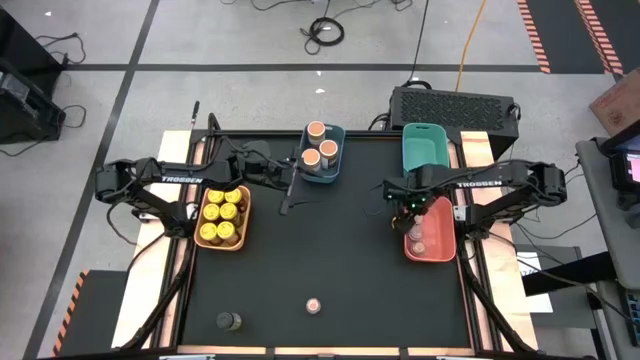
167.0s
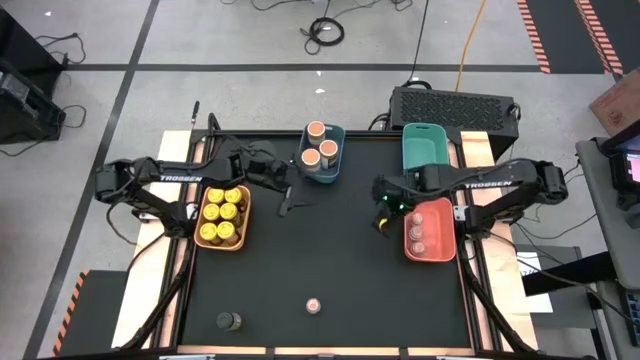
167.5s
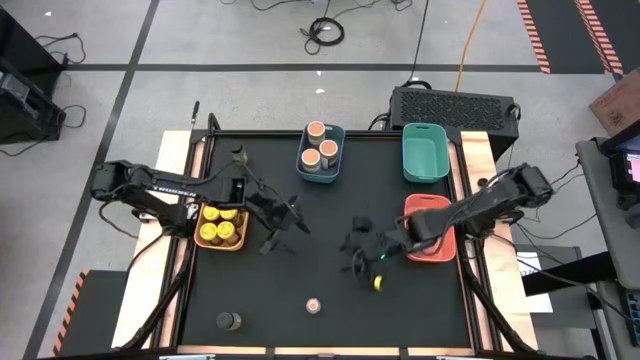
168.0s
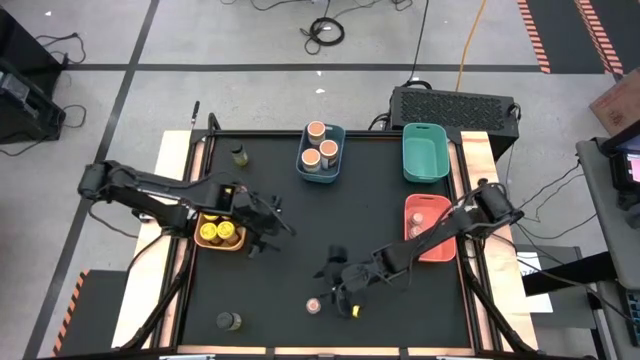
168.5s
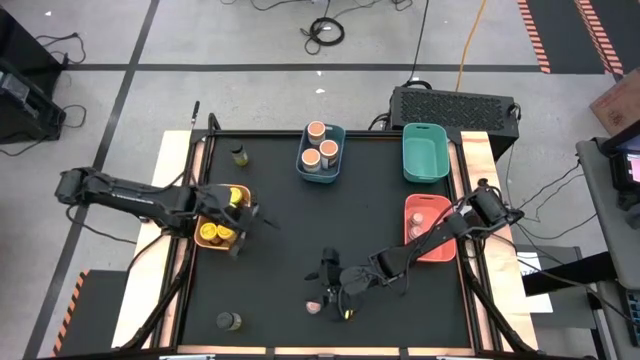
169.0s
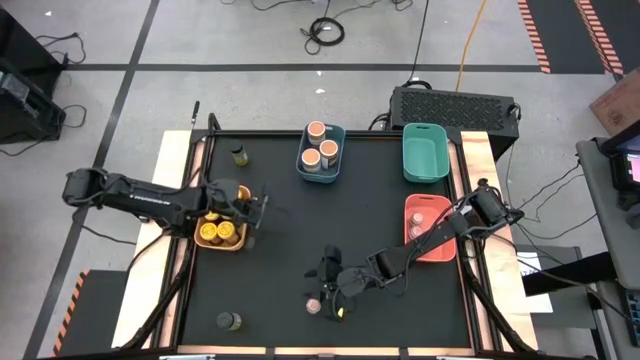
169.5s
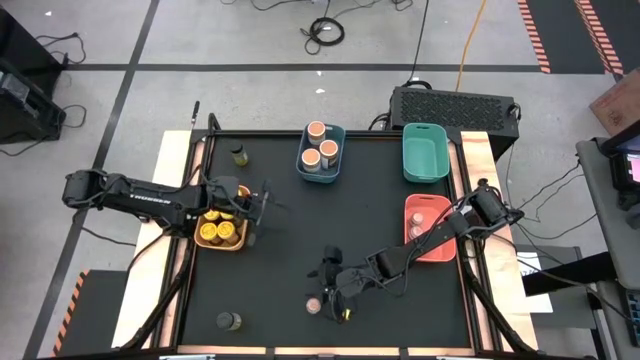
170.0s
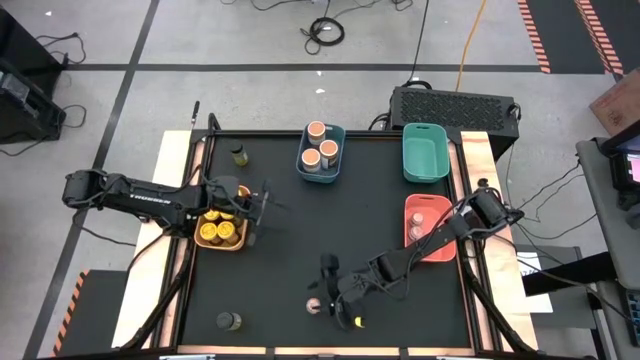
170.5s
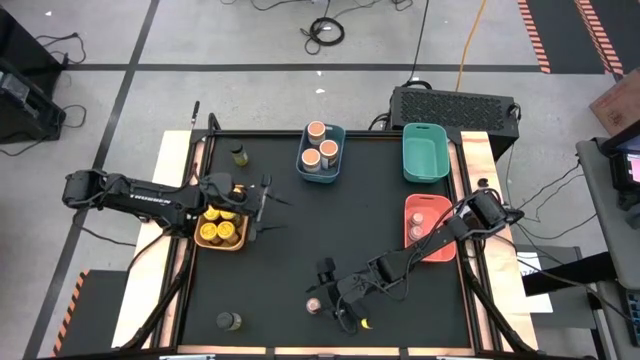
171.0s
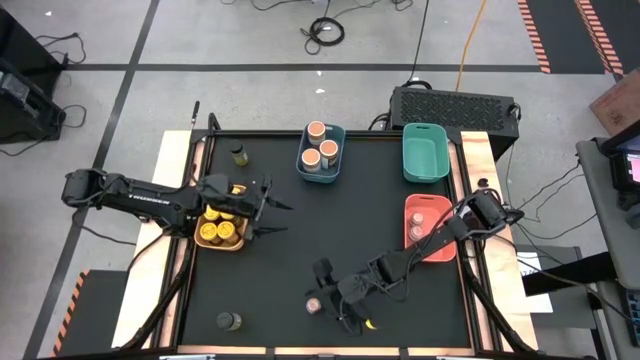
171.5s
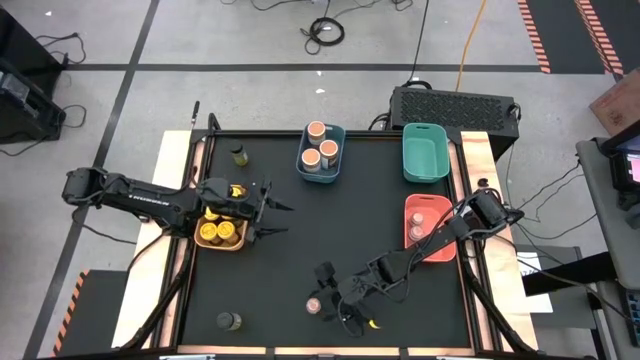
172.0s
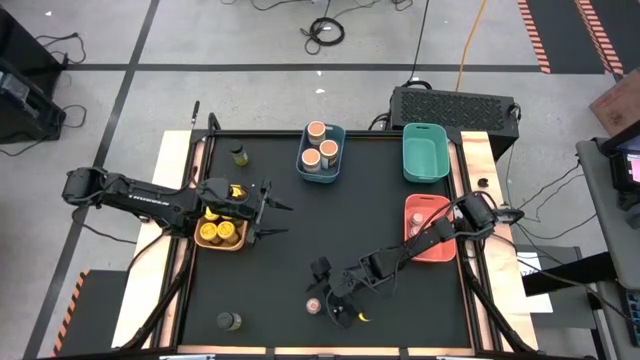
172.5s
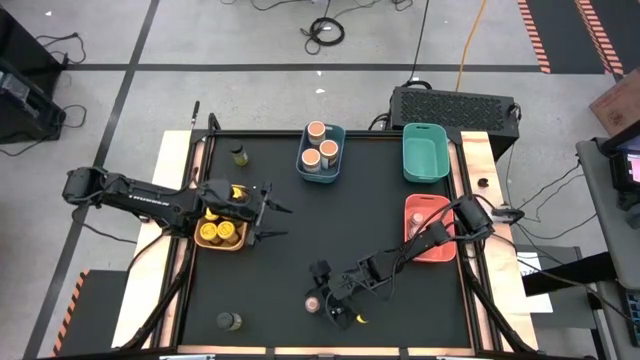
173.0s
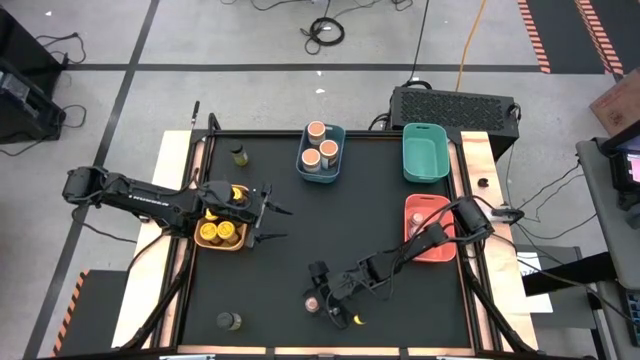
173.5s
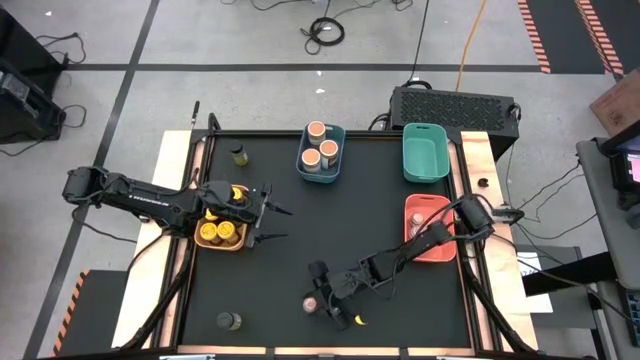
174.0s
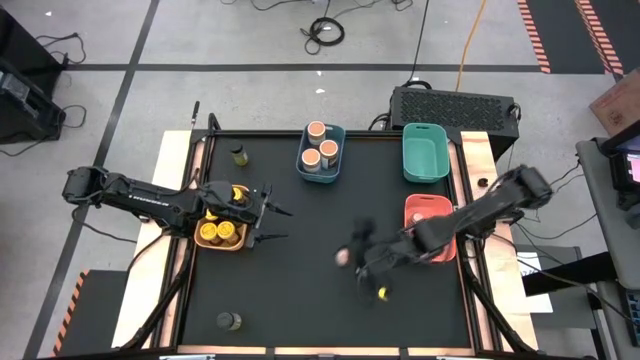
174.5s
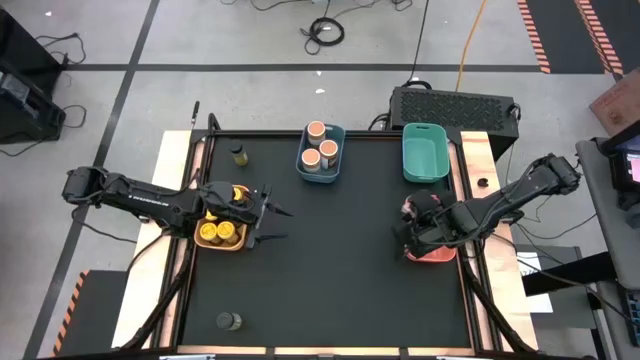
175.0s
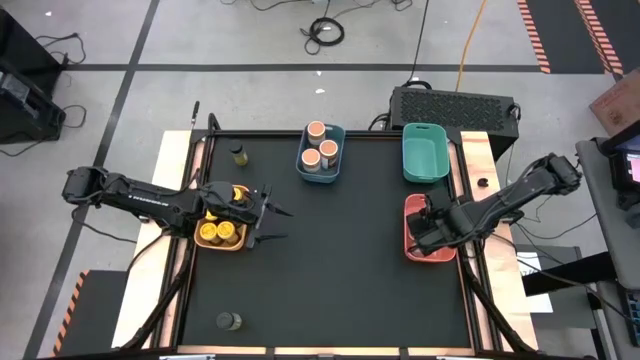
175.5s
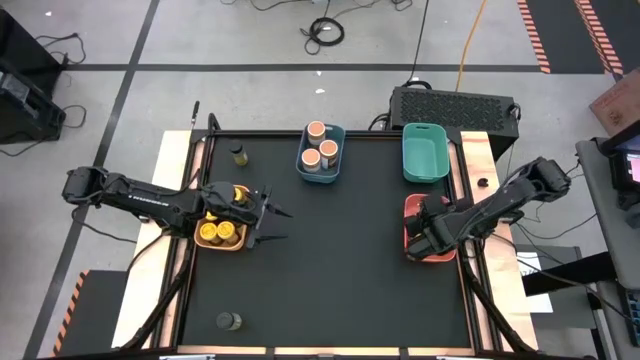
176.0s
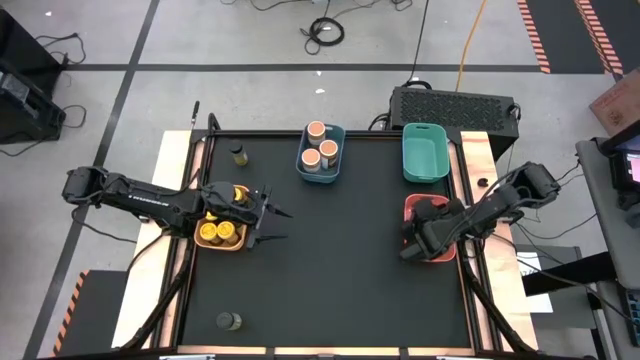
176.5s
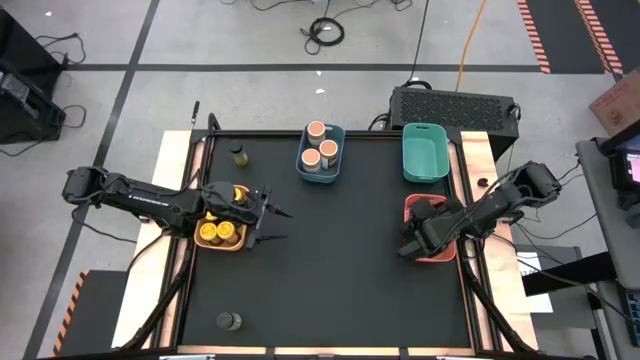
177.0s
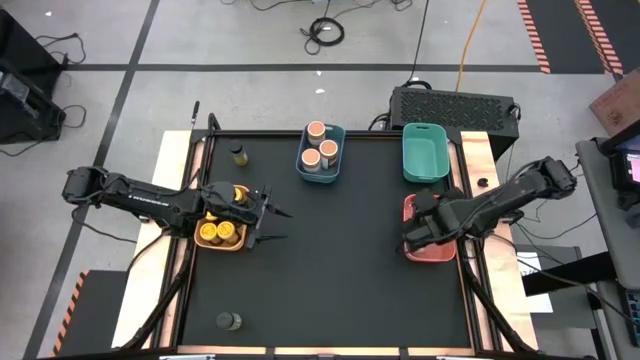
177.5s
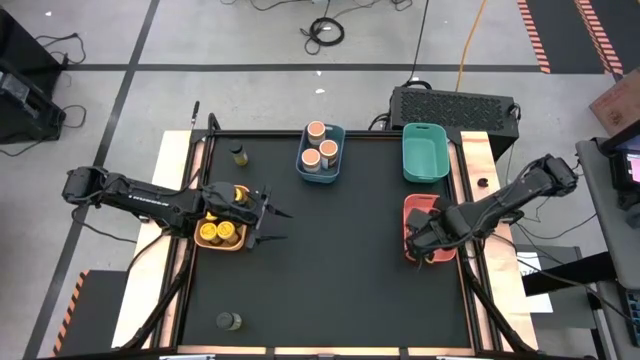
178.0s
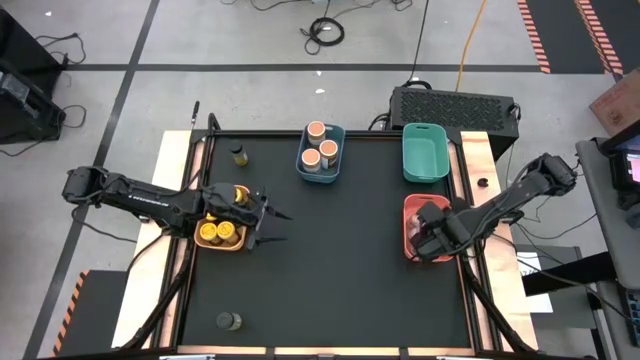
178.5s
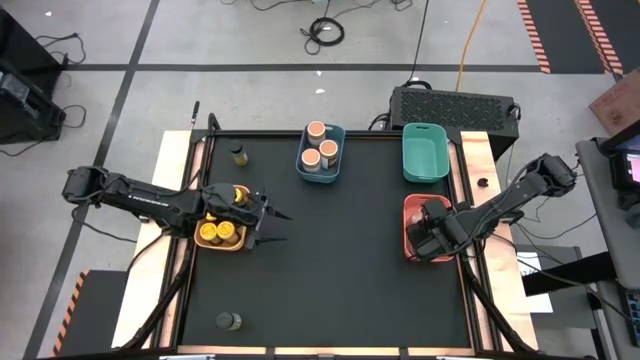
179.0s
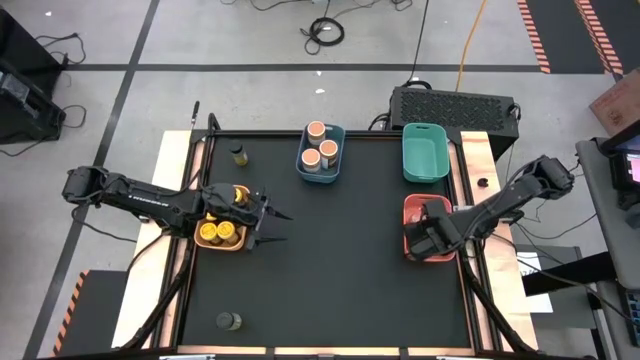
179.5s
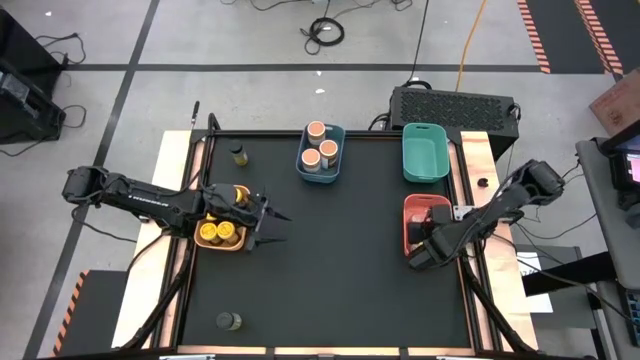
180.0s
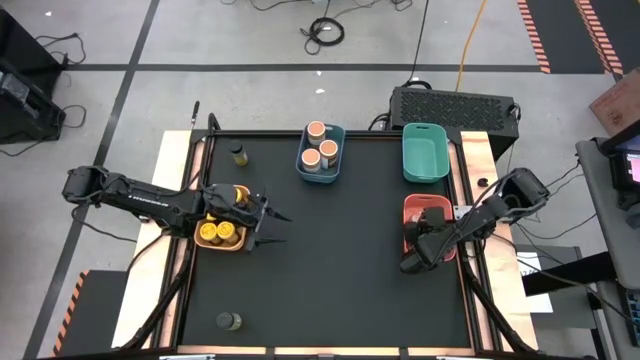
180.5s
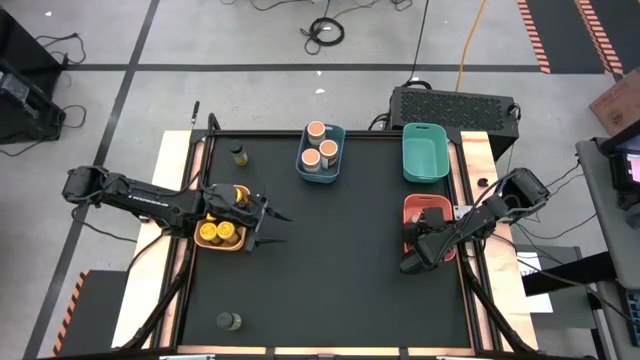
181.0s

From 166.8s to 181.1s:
Task: Sort spices by type
Put the small brown seasoning bottle into the orange bin

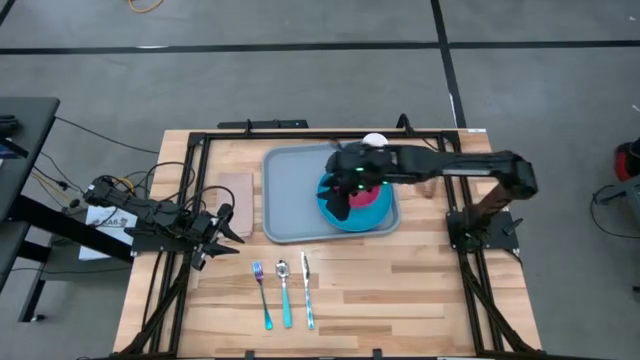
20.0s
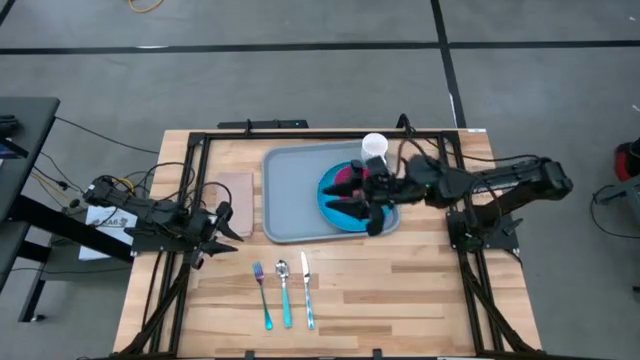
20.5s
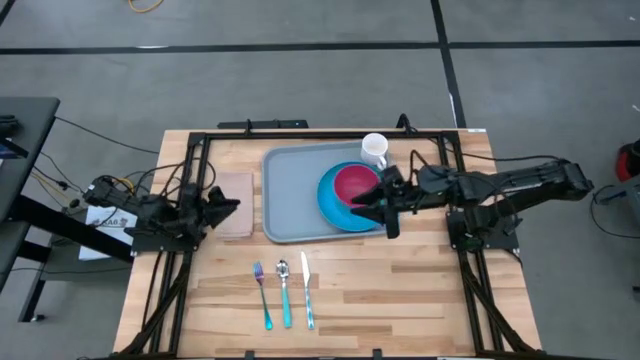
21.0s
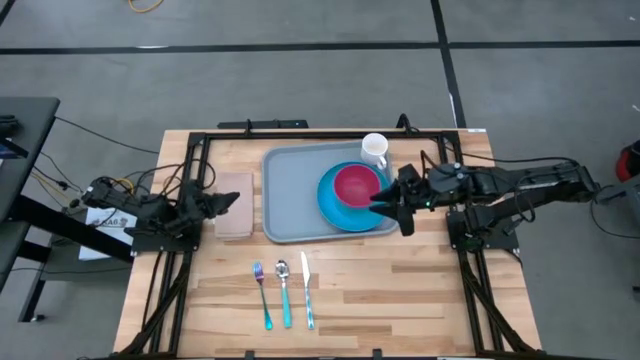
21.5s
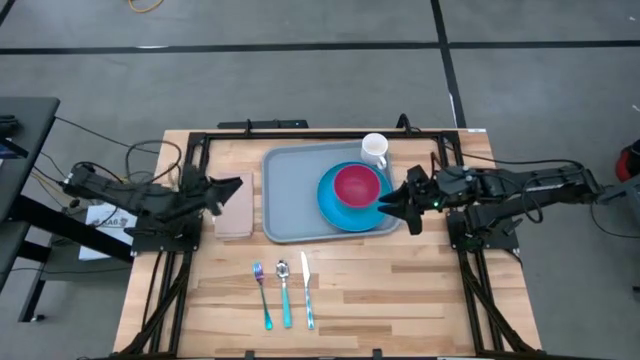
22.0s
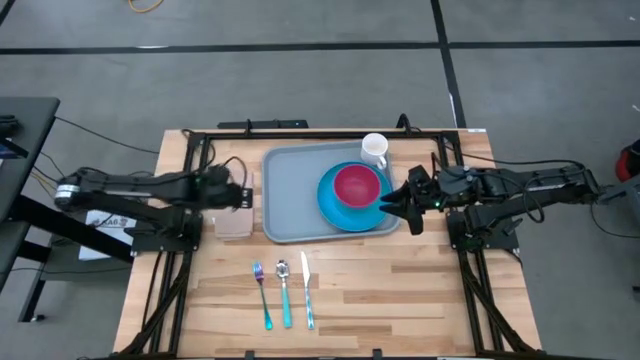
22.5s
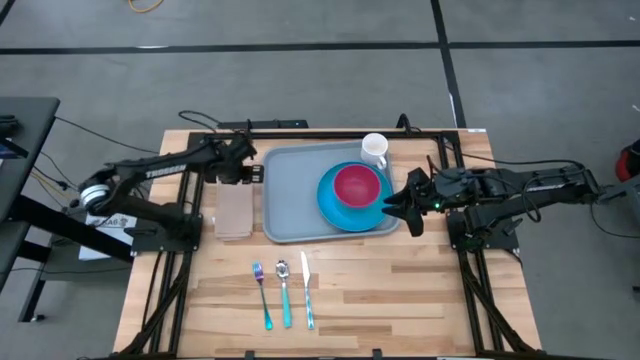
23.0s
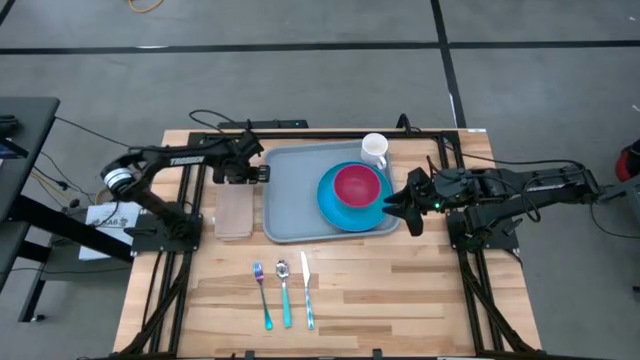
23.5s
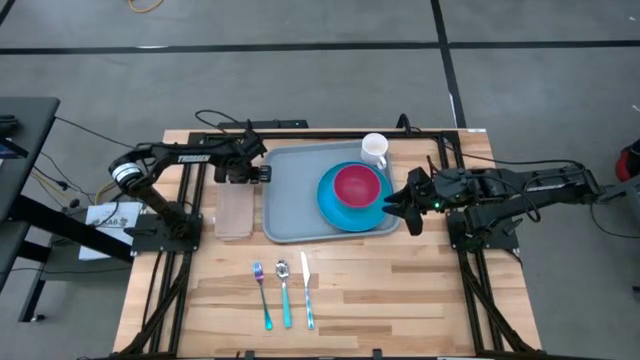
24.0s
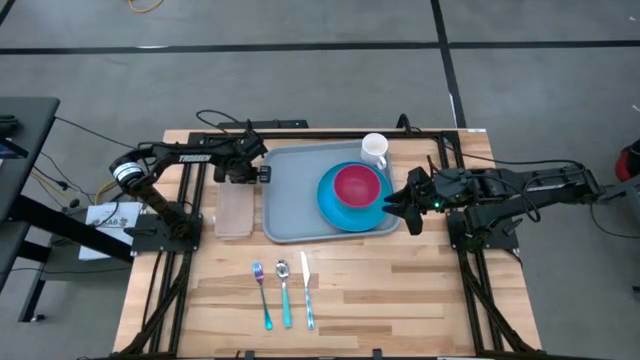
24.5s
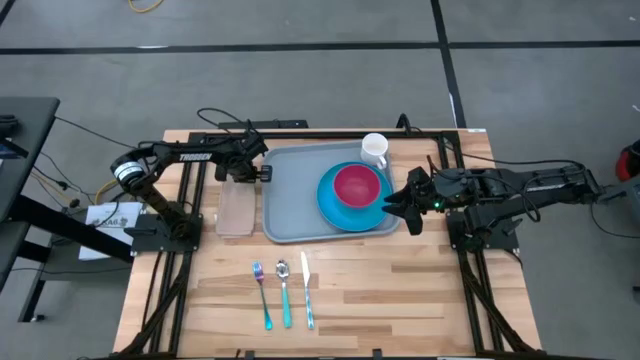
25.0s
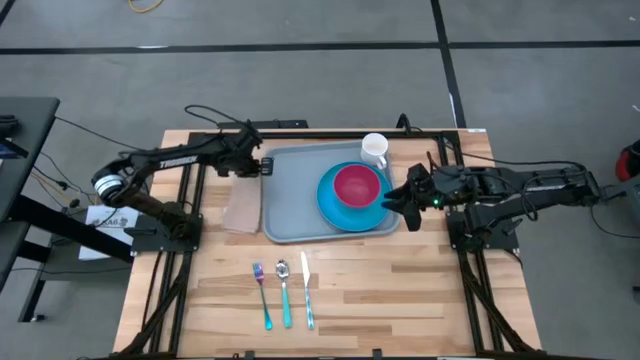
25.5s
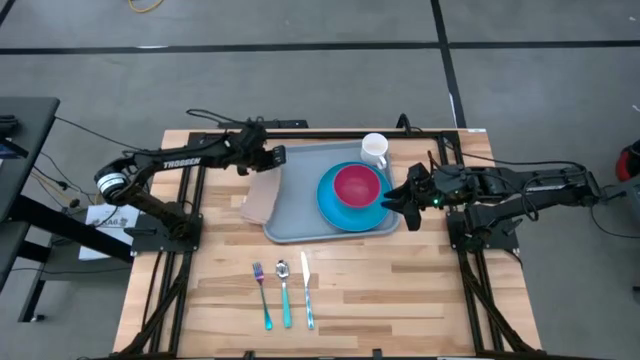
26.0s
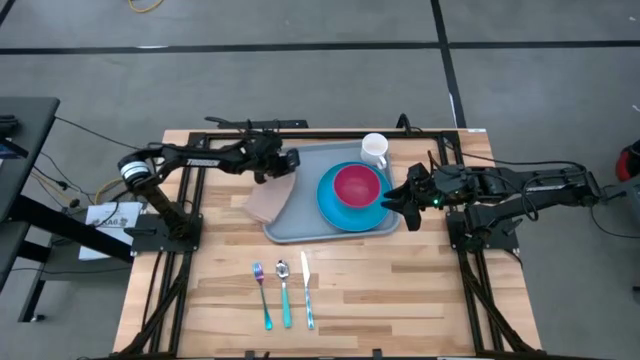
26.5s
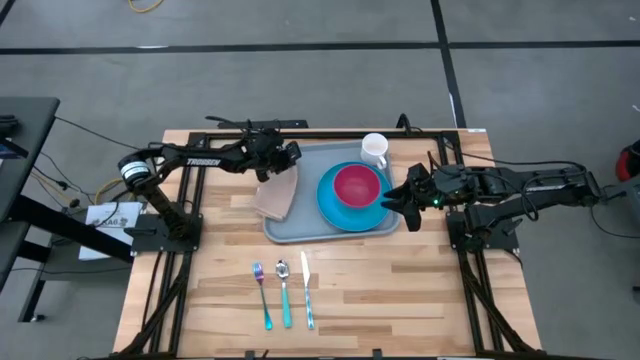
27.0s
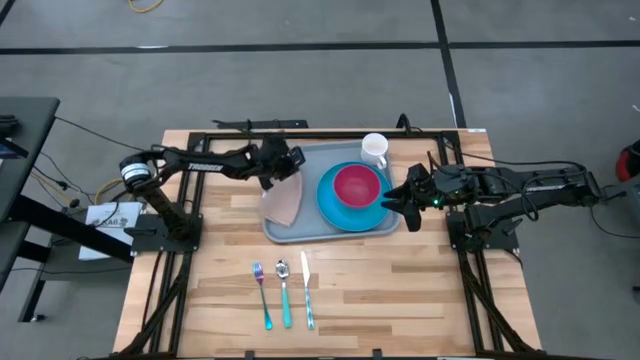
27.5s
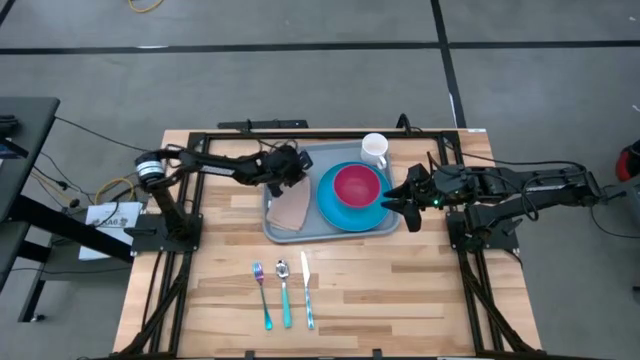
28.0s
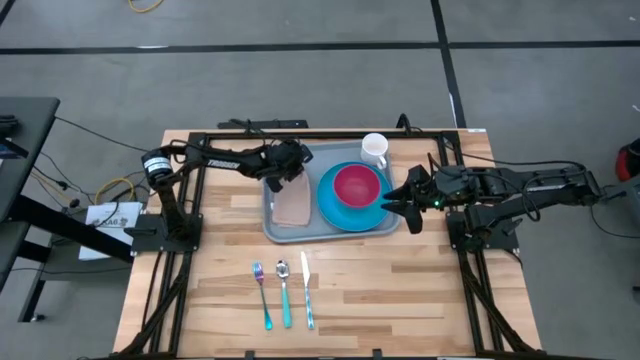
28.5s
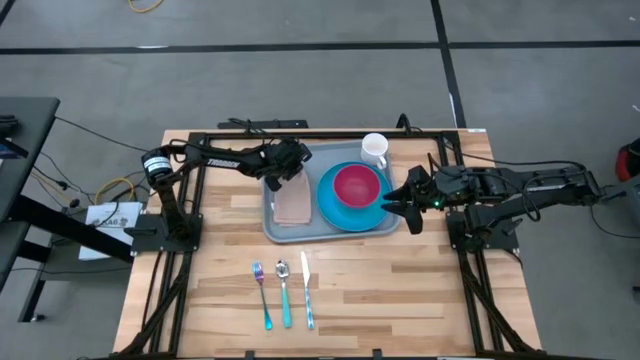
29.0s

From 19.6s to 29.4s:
Task: Set up tray
Put the brown napkin on the blue tray on the left of the blue plate on the blue tray
